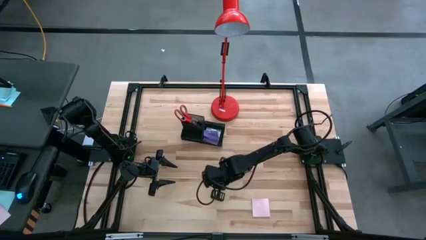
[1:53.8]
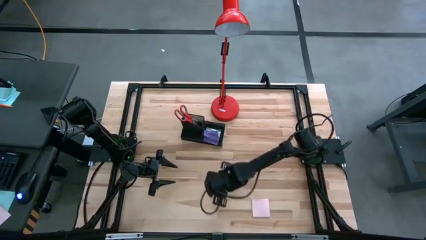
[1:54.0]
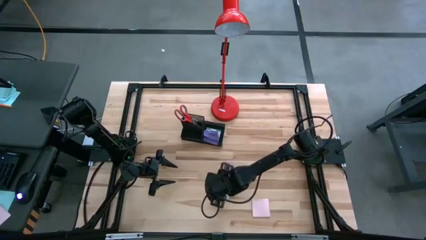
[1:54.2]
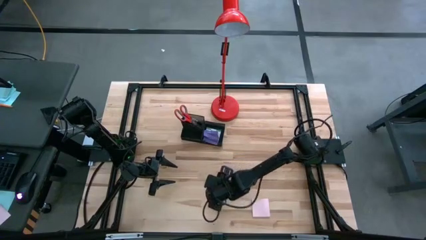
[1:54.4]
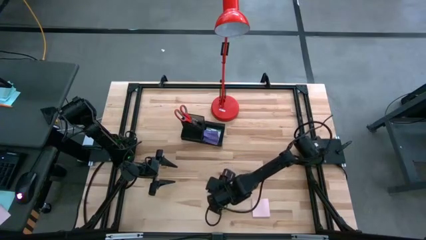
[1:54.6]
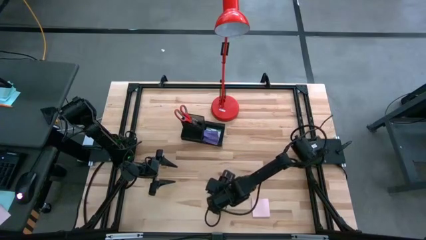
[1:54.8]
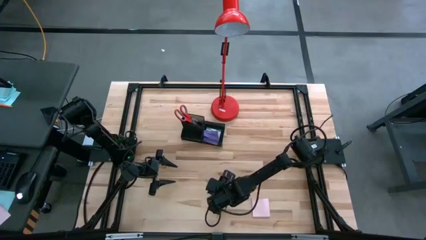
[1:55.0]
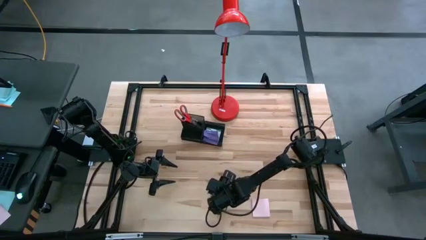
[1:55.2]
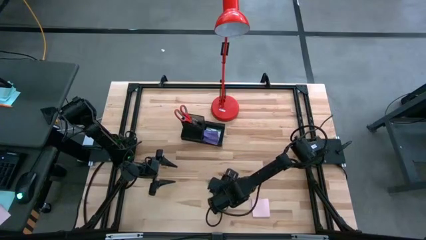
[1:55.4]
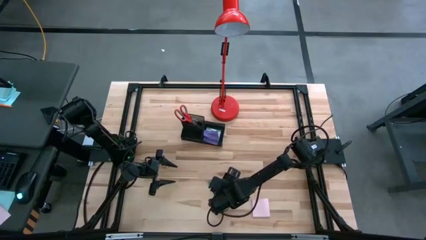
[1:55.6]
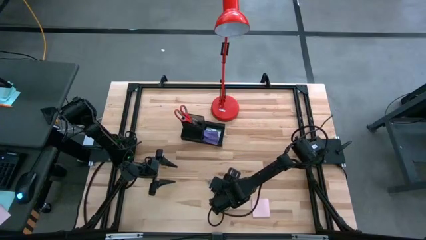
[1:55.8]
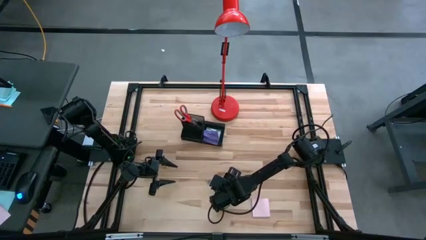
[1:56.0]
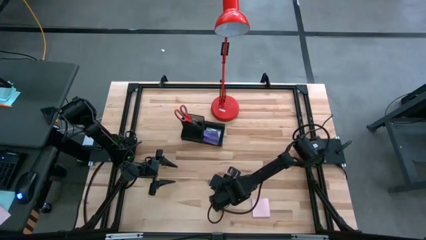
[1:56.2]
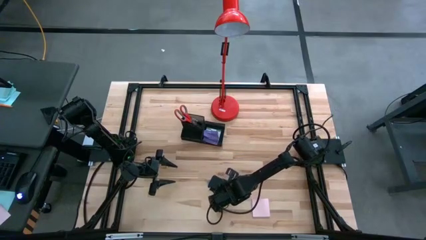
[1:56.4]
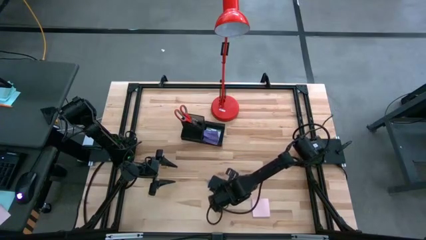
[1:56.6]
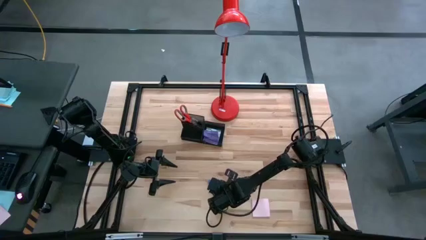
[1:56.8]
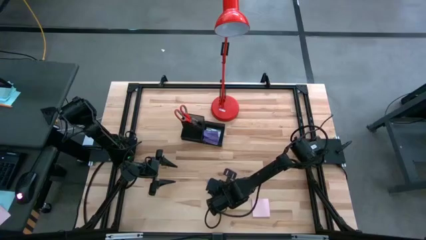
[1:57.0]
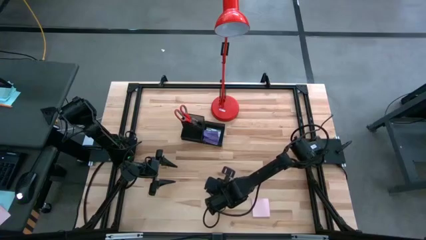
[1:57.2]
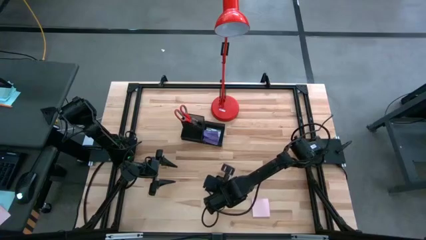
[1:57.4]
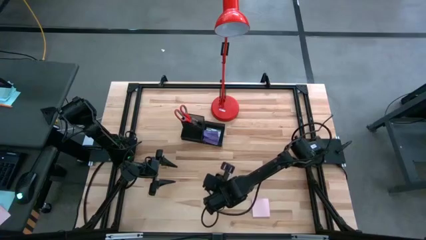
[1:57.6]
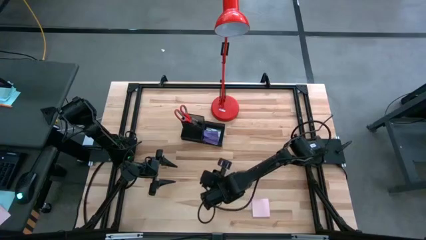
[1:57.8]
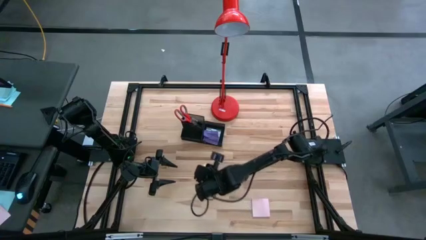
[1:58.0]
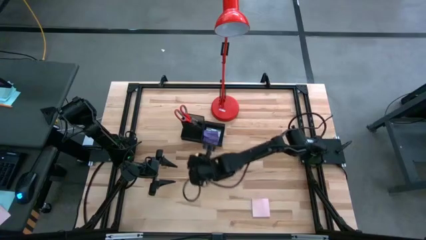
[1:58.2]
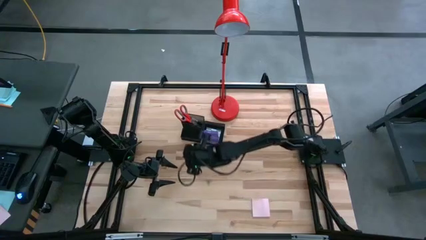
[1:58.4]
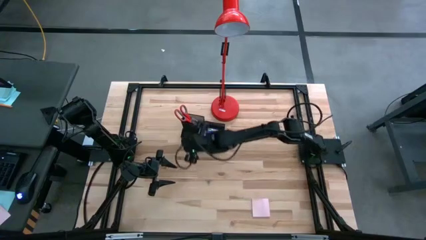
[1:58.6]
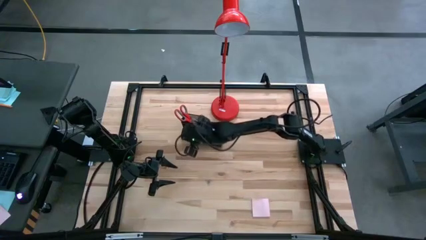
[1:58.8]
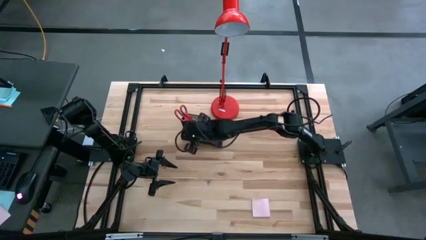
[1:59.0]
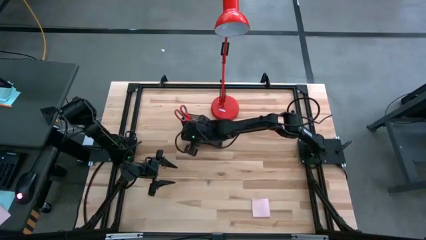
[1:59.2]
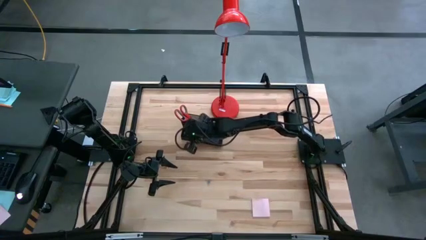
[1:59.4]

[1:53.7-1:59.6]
Task: Pick and place office supplies into organizer
Put the yellow eraser into the desk organizer

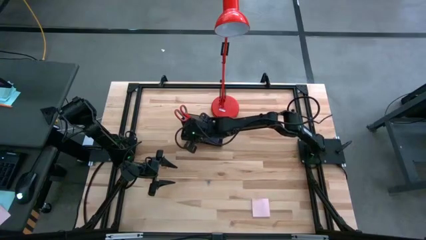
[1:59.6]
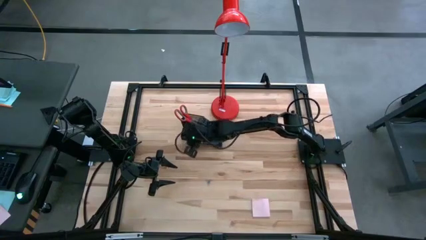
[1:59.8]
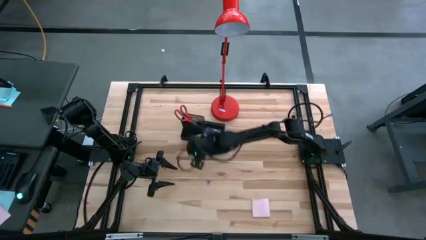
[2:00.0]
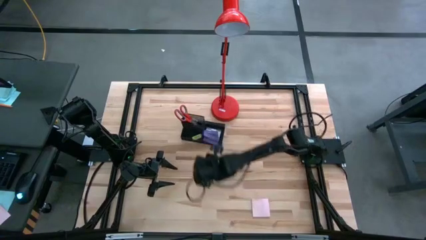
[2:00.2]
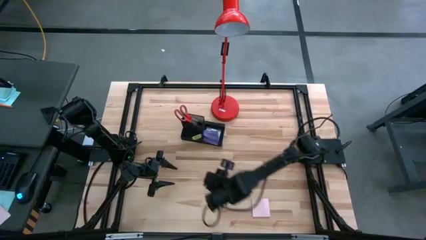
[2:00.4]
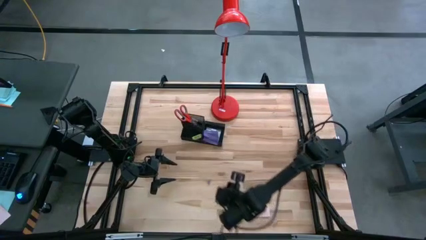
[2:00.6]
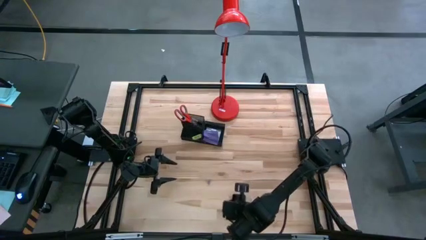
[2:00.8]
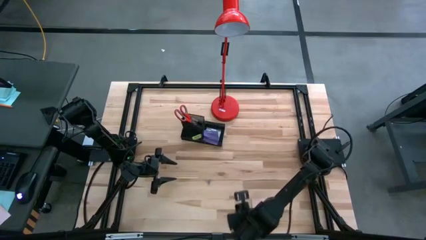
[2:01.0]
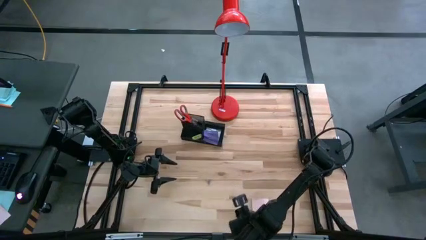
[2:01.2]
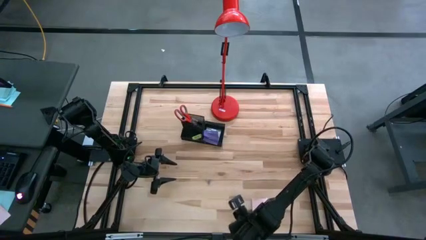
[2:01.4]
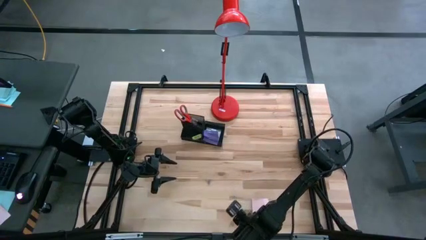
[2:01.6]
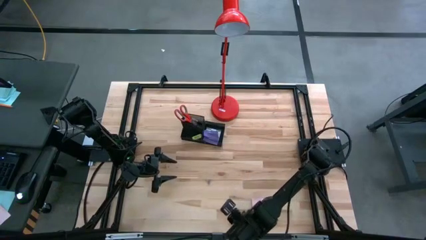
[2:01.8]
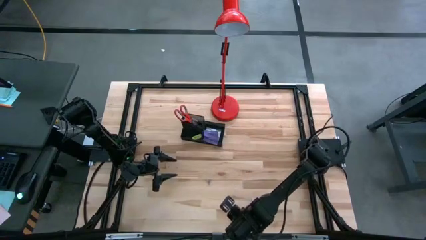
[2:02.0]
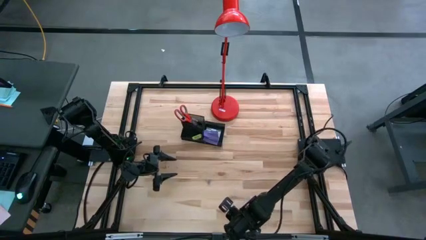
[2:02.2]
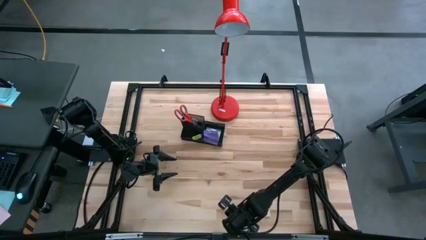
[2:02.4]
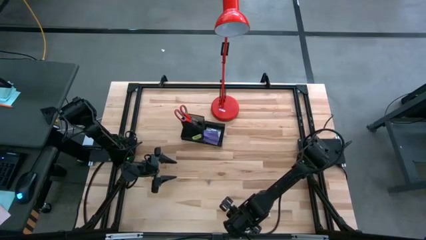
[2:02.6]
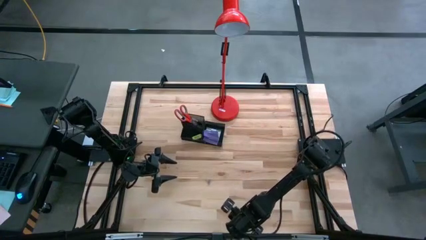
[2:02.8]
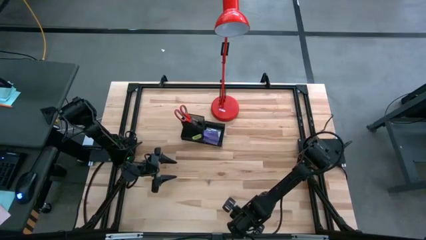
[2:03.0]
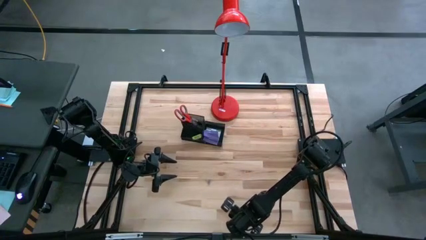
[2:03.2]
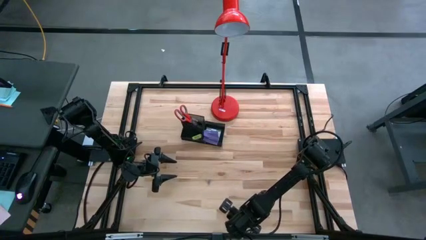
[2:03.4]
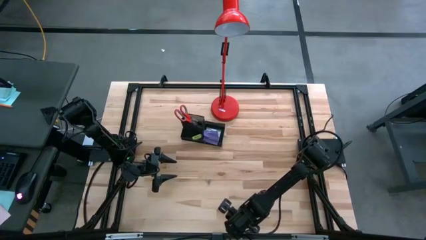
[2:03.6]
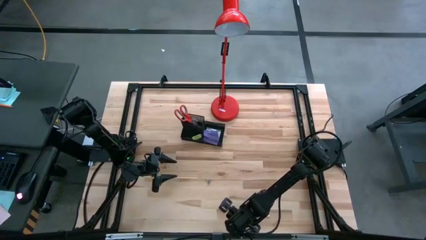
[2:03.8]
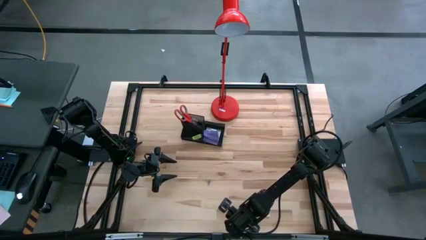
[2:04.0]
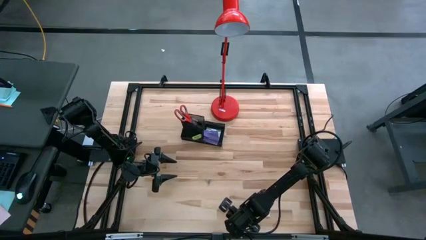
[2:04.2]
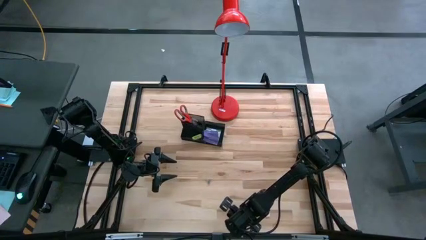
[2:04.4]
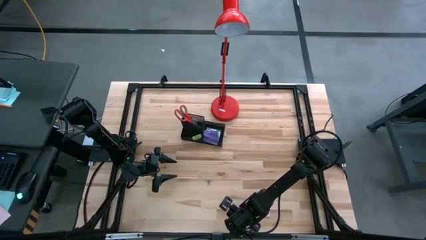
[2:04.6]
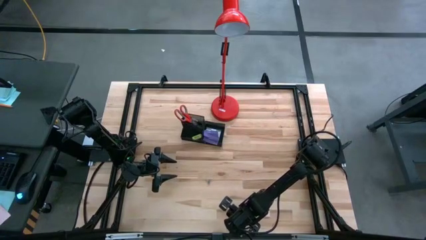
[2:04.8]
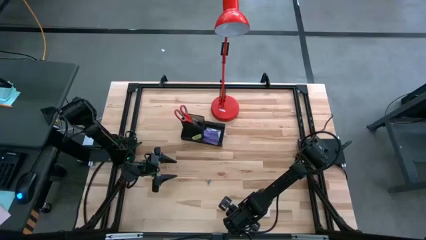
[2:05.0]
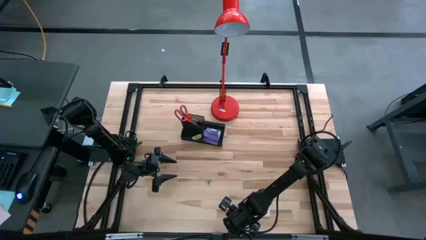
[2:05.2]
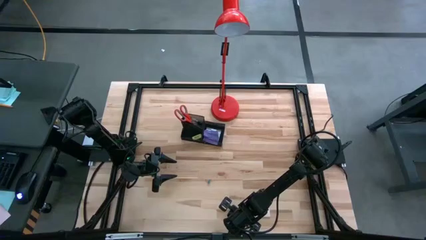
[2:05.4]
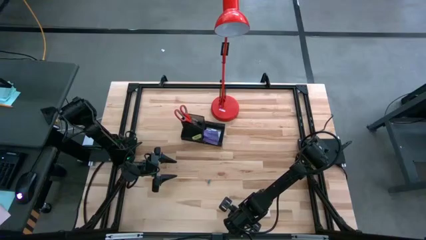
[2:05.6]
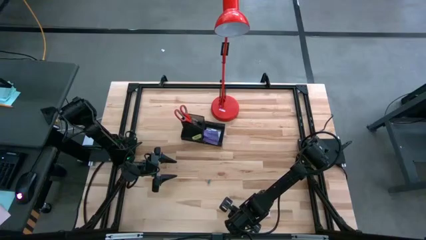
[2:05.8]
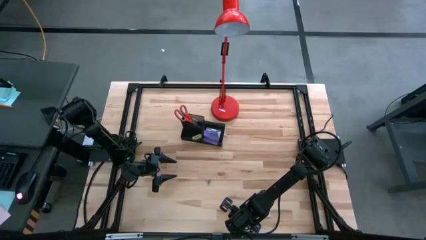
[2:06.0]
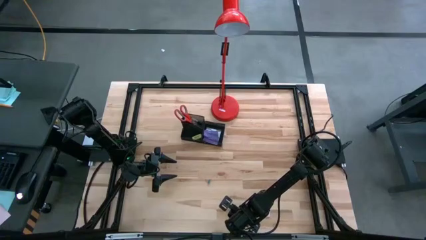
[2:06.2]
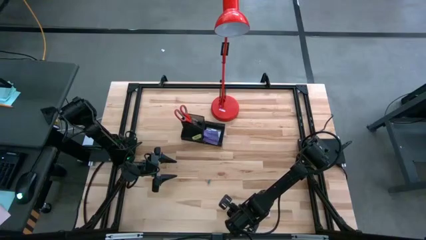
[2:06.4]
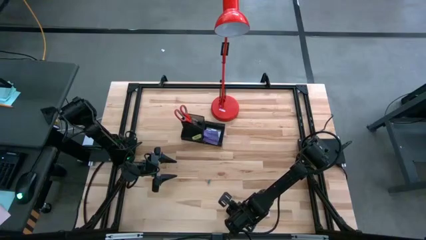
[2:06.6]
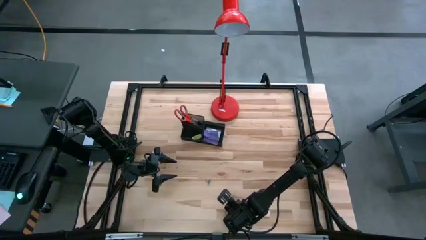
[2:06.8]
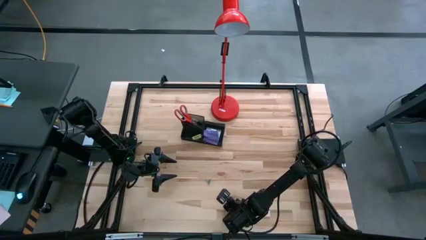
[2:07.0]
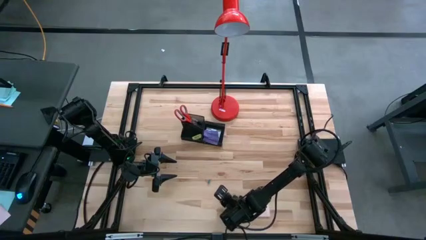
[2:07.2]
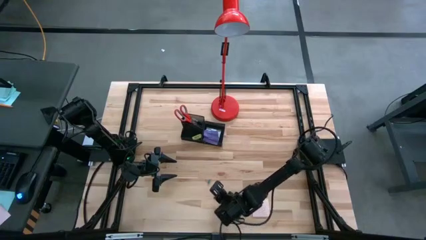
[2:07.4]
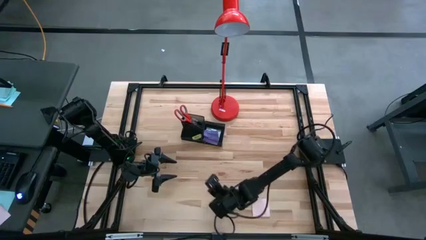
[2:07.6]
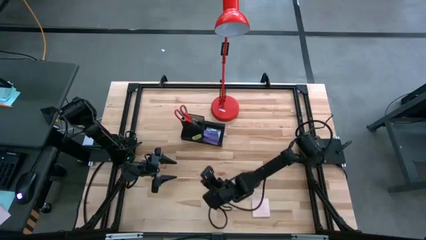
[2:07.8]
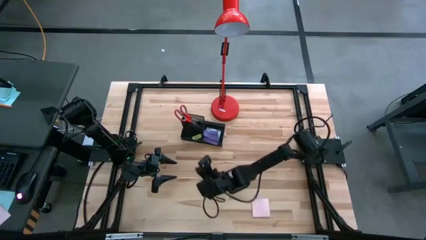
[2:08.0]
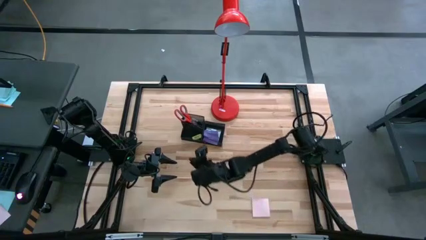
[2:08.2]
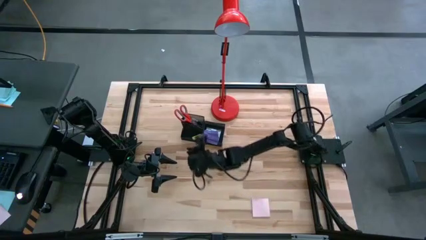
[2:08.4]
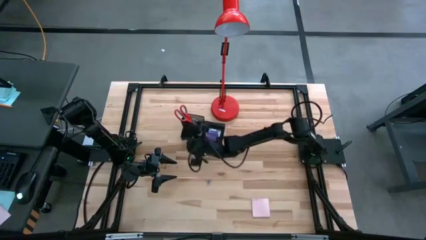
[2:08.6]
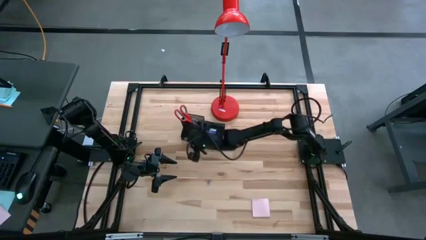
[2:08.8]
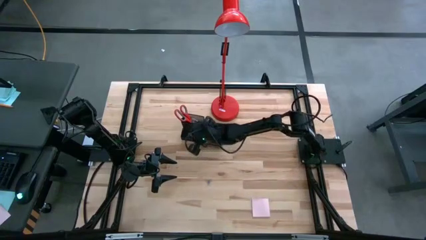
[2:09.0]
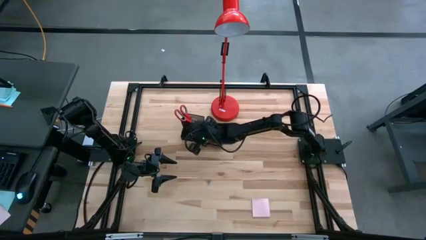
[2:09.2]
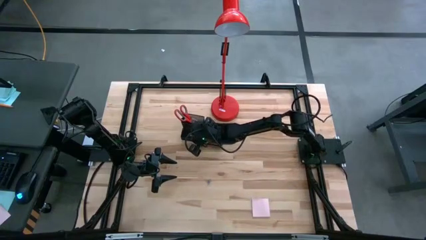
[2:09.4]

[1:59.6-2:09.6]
Put the pink binder clip into the desk organizer

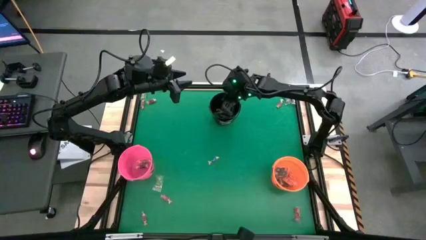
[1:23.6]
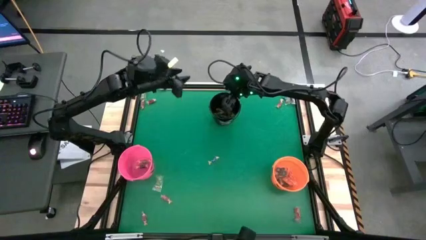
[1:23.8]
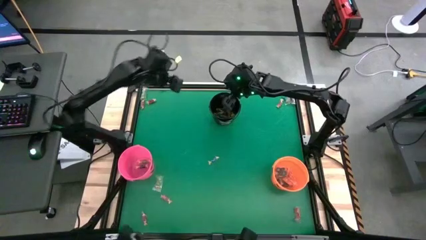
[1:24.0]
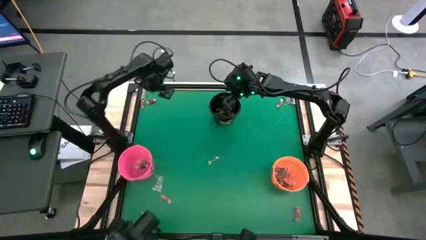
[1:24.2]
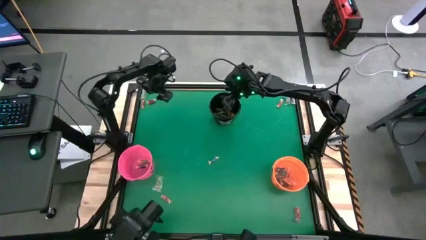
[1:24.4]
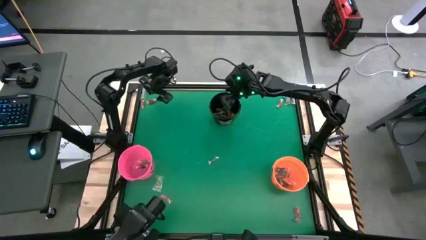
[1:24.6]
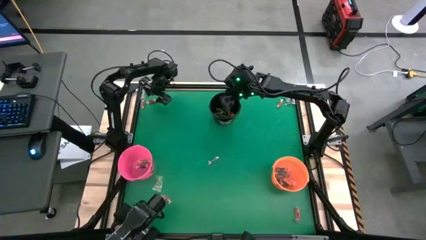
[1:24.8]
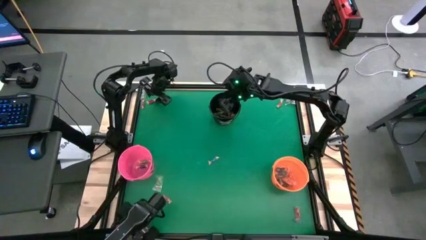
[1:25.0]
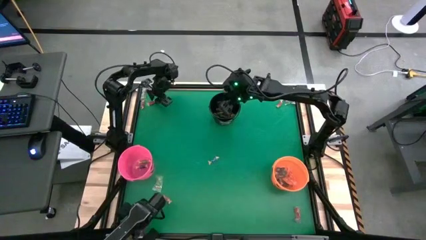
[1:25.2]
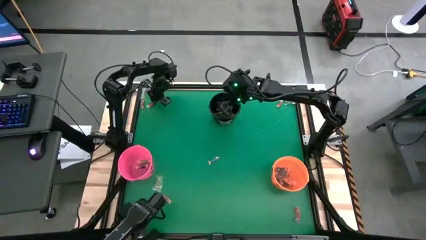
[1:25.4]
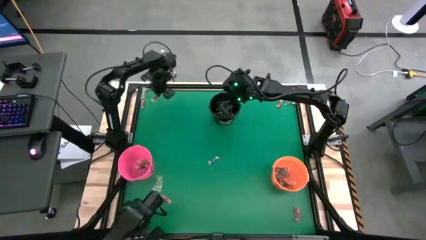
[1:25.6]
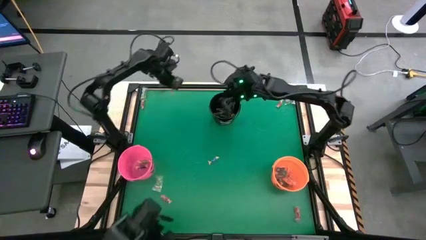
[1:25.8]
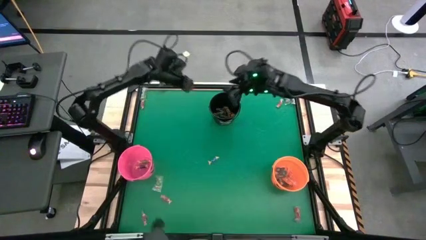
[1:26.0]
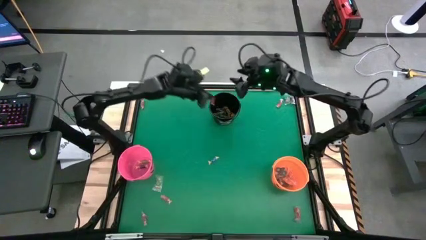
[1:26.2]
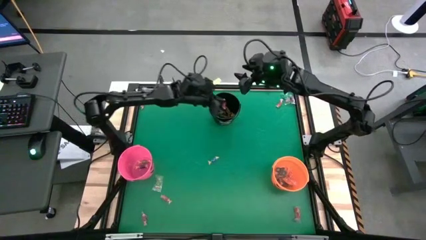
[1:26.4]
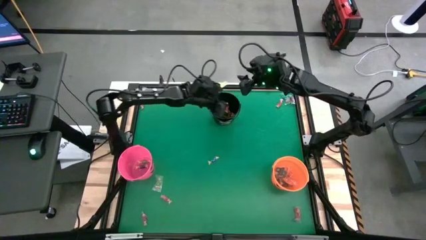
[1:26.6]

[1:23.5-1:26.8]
Task: Sort candy by brand, put in halloween buckets
Put the red candy into the black bucket
